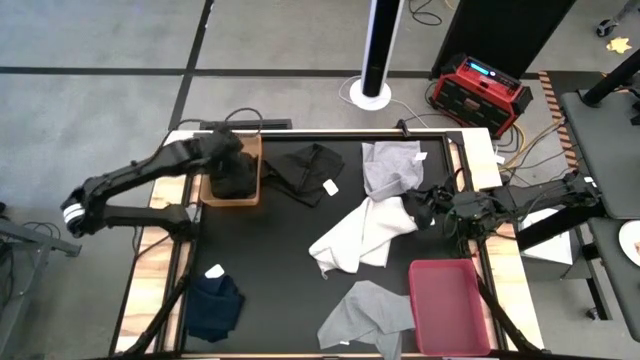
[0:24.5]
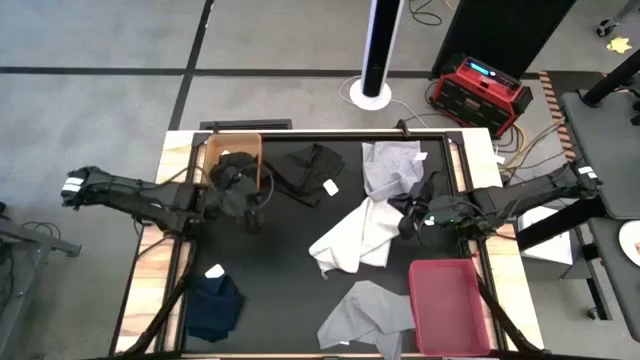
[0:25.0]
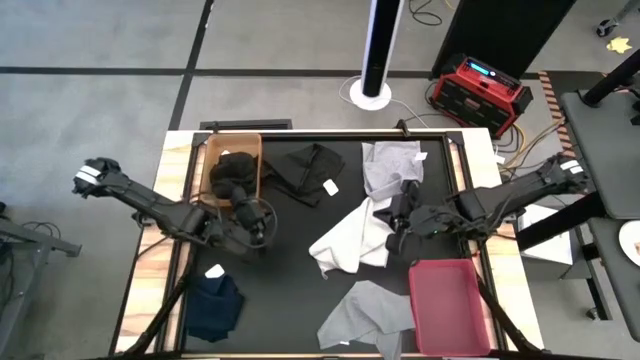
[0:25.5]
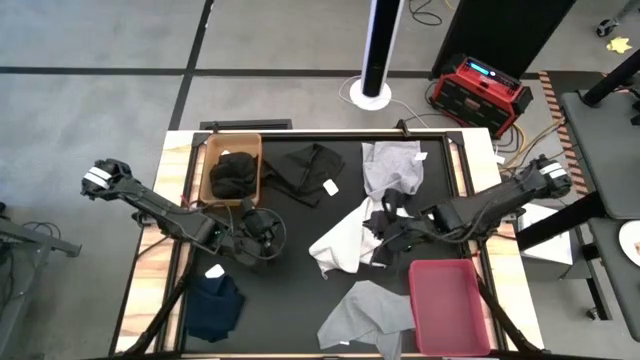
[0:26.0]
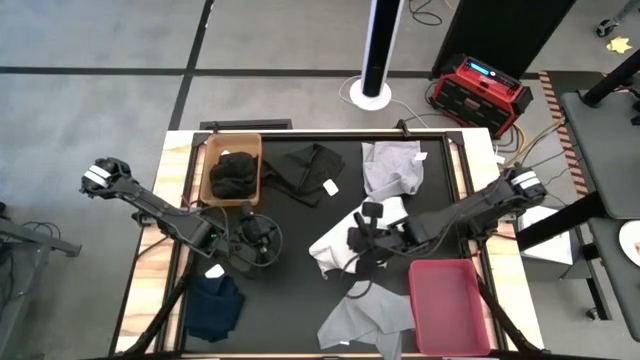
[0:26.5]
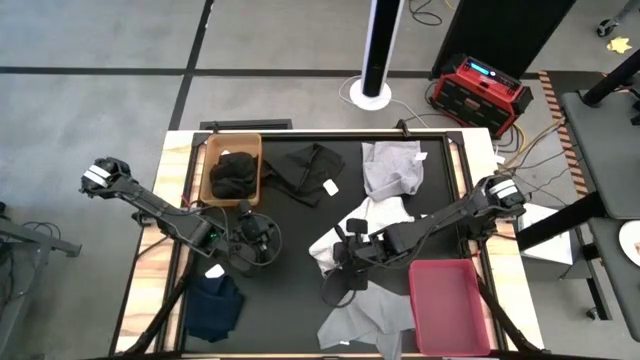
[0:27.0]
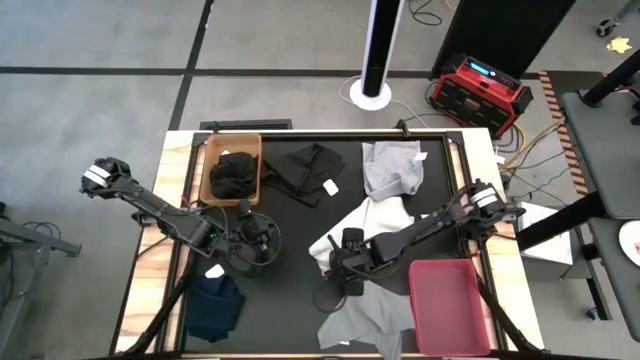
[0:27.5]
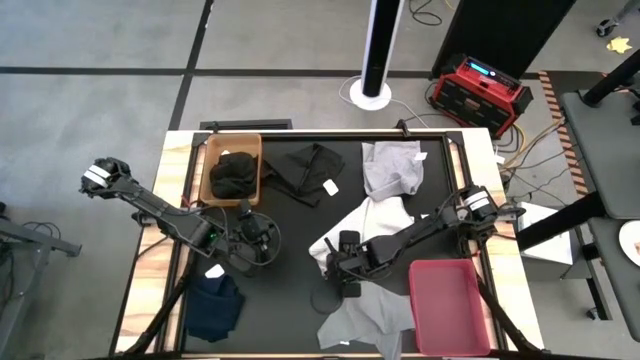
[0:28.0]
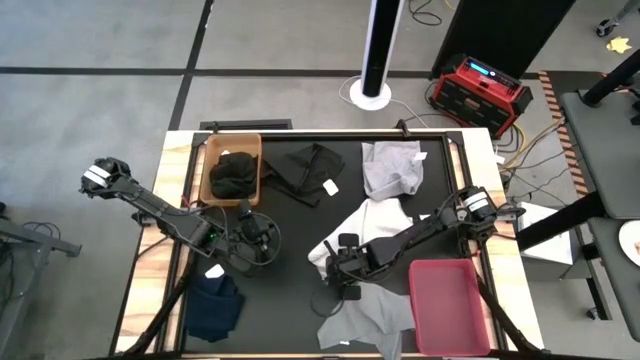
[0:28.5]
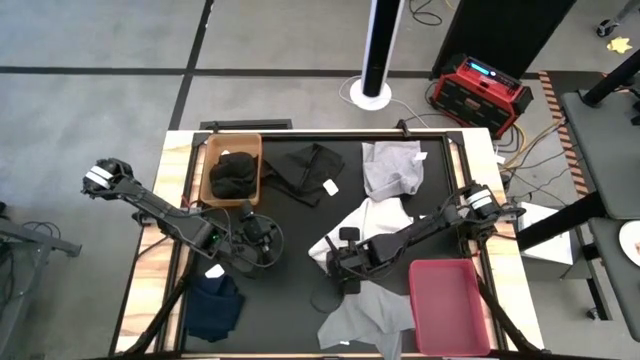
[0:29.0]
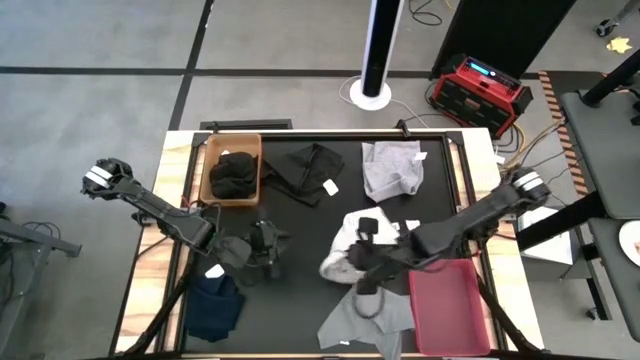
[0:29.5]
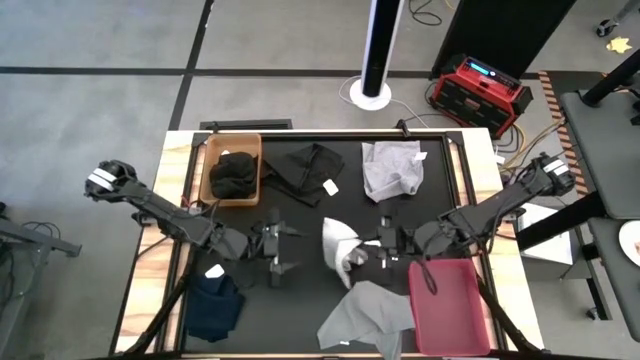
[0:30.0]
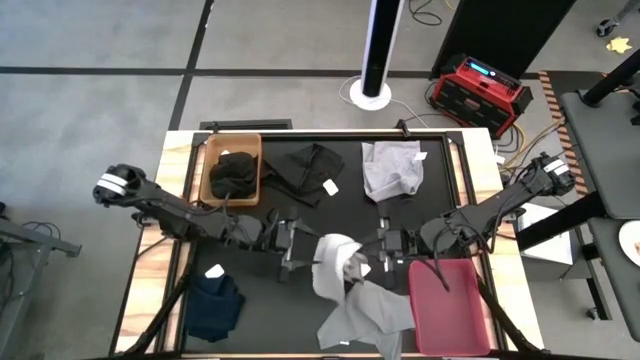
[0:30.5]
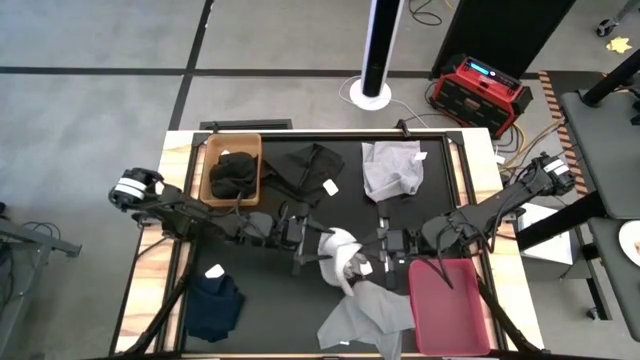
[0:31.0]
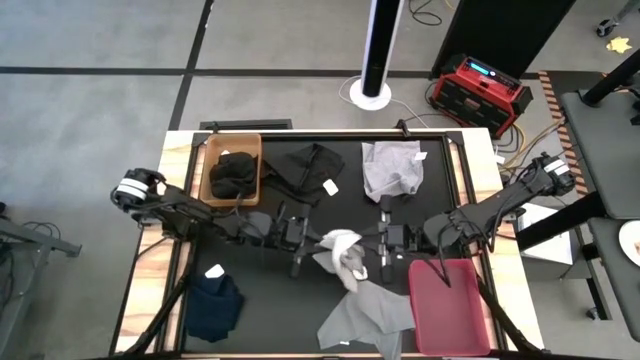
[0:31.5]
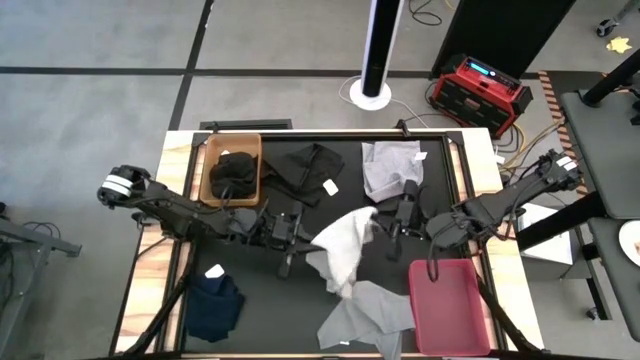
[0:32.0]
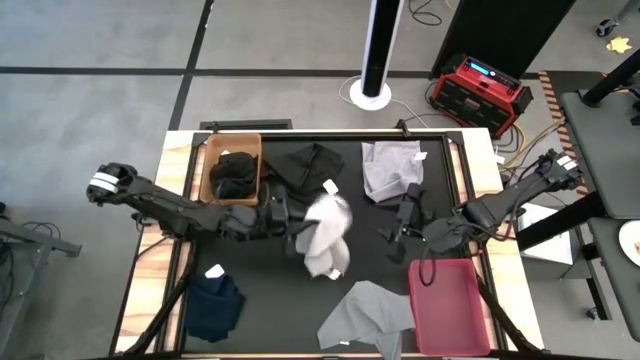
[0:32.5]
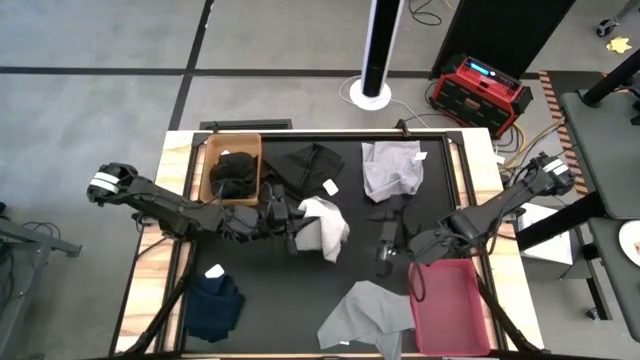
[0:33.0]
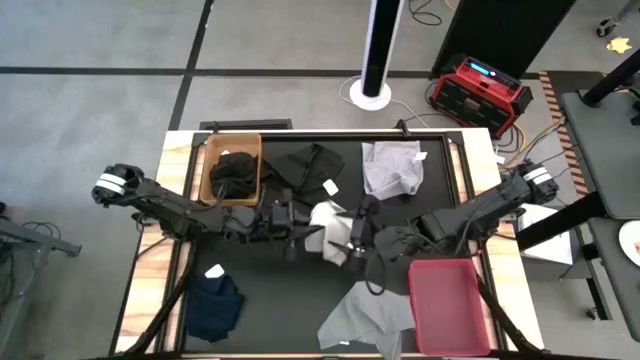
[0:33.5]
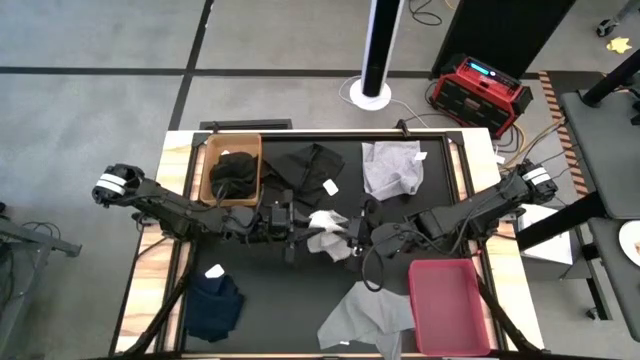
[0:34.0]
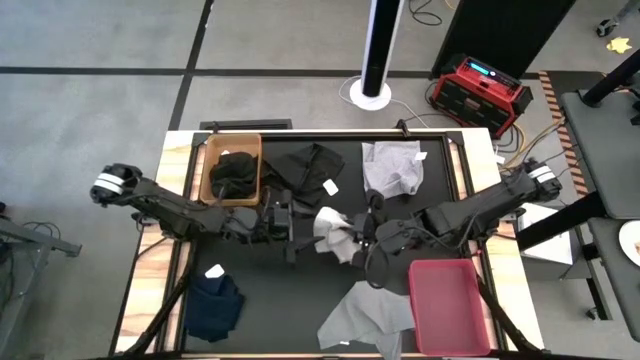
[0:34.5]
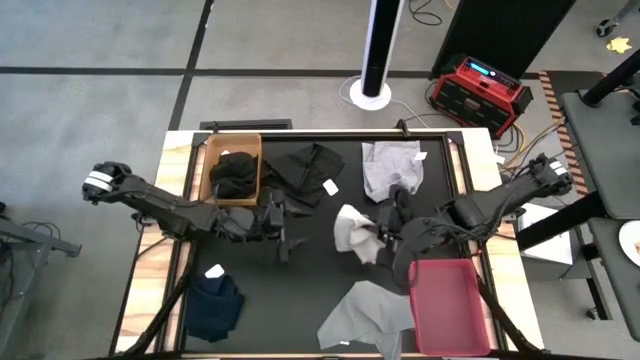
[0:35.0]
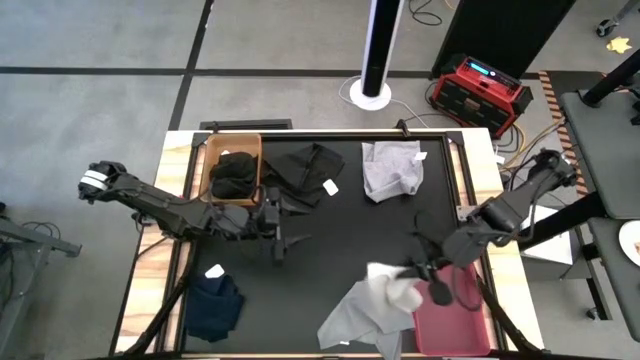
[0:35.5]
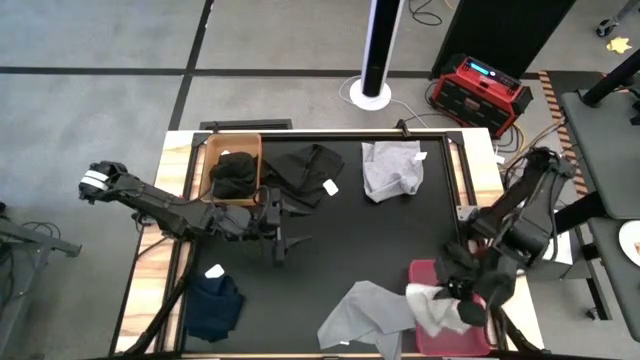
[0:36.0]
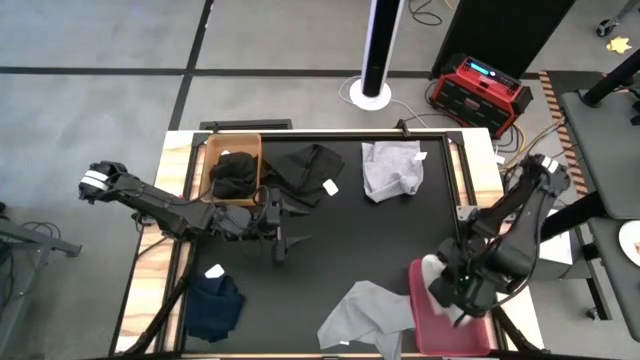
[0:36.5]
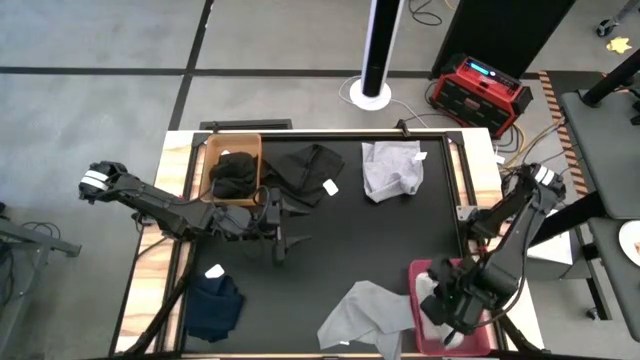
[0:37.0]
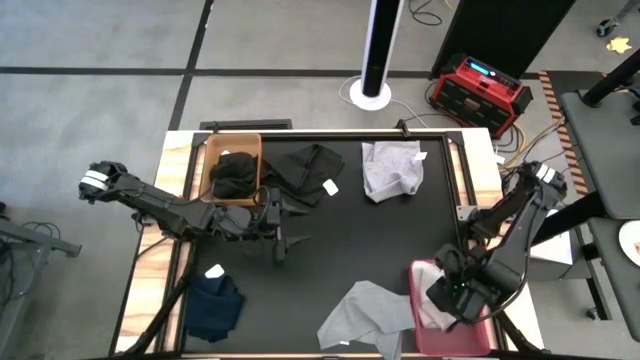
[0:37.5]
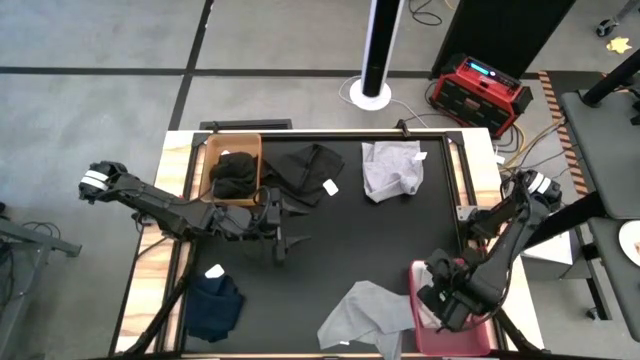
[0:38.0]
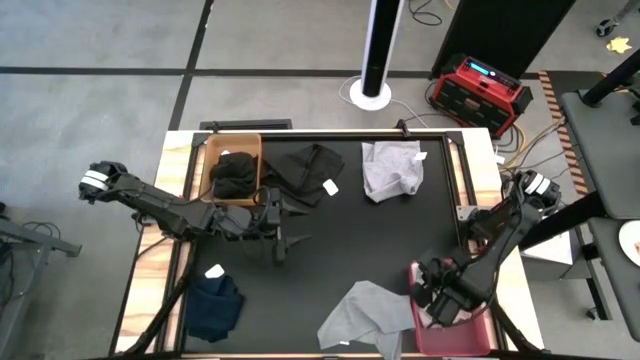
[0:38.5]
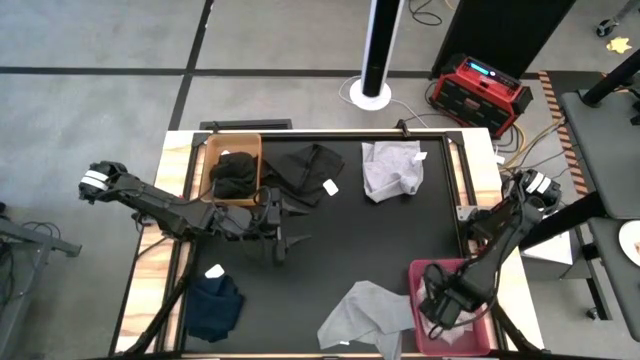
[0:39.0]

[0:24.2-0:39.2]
Task: Sort towels by color in basket
Put the white towel into the pink bin

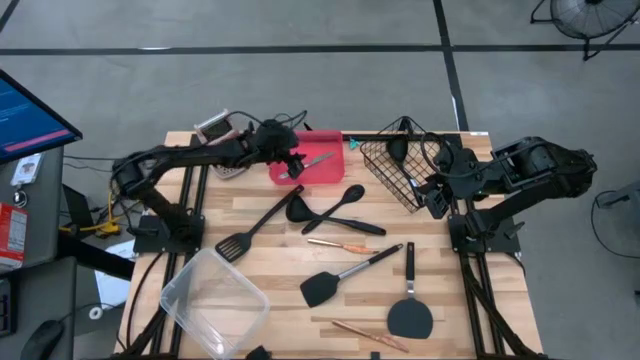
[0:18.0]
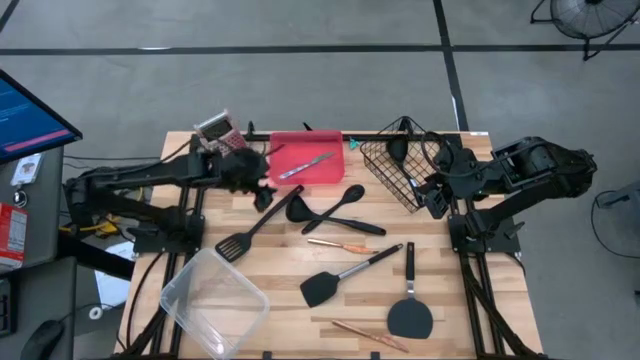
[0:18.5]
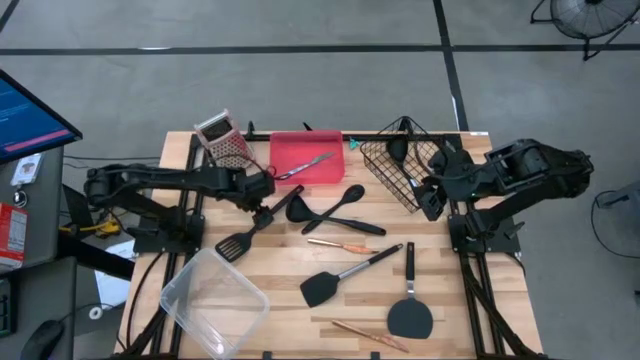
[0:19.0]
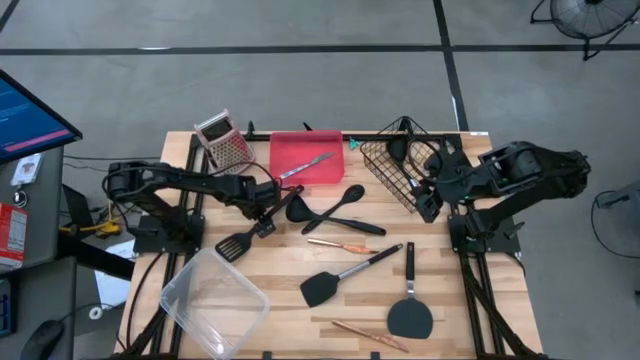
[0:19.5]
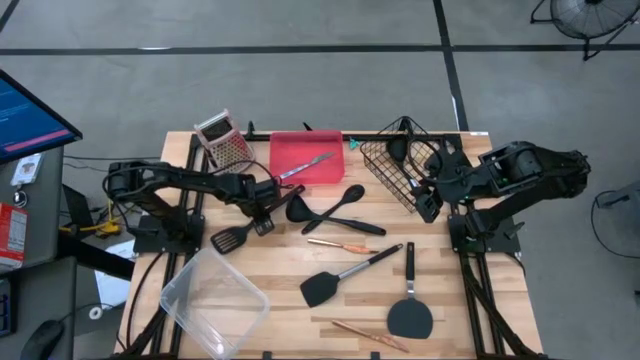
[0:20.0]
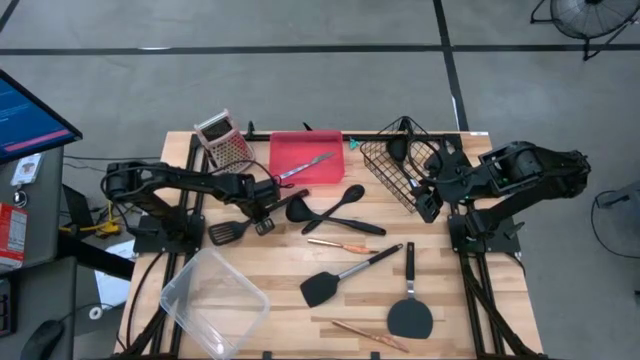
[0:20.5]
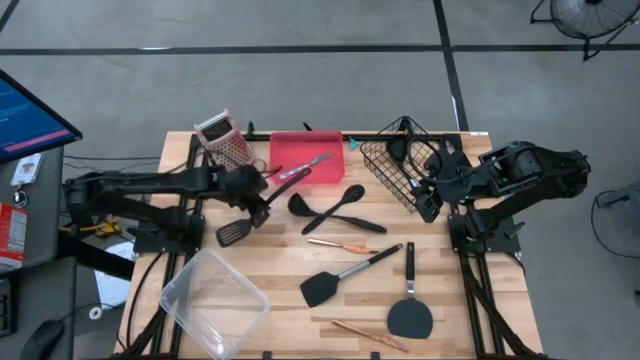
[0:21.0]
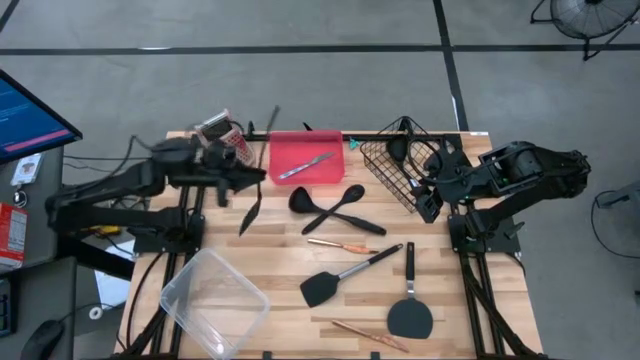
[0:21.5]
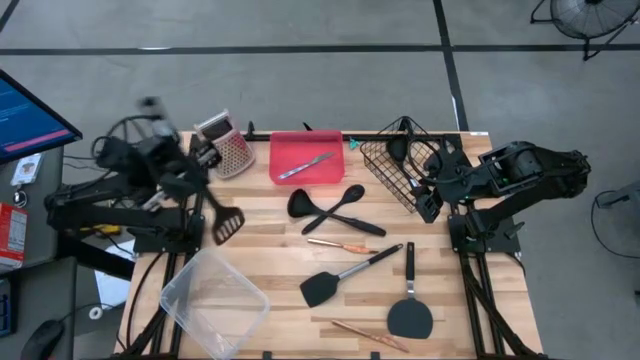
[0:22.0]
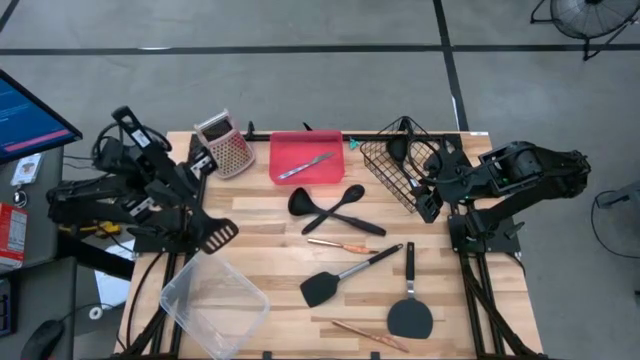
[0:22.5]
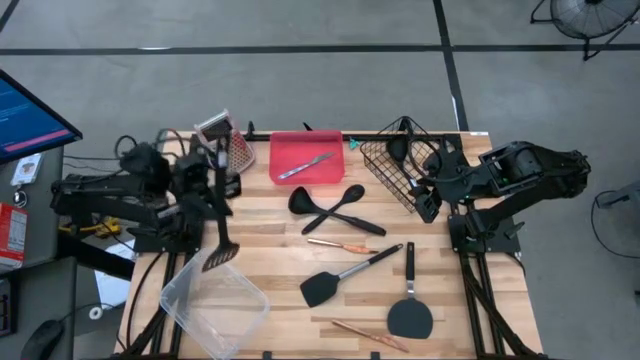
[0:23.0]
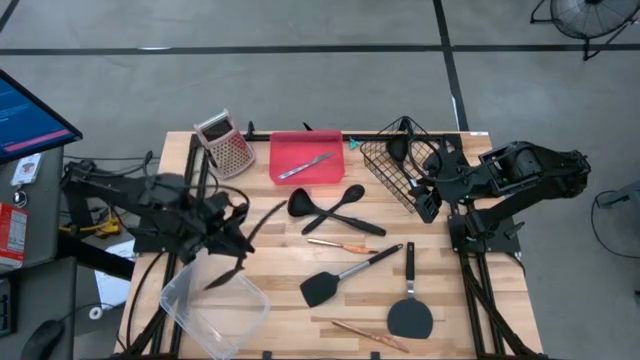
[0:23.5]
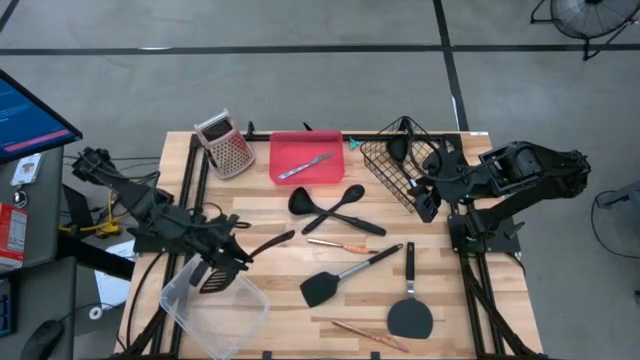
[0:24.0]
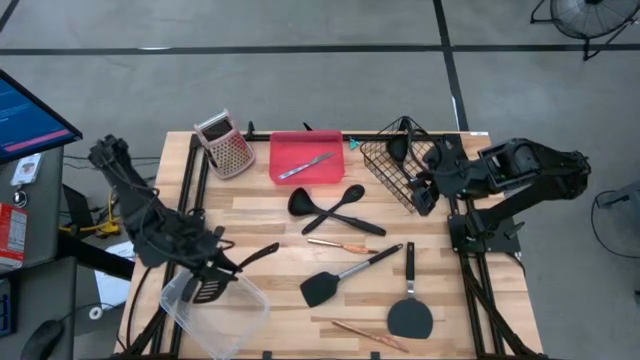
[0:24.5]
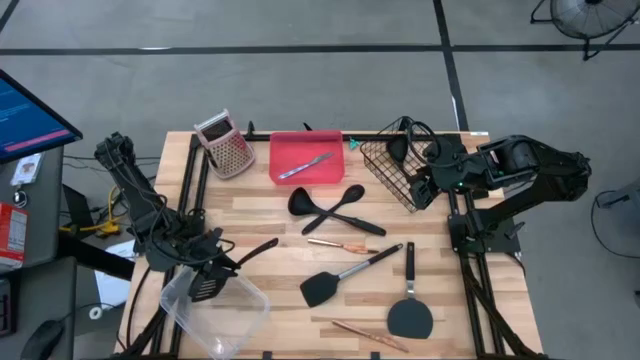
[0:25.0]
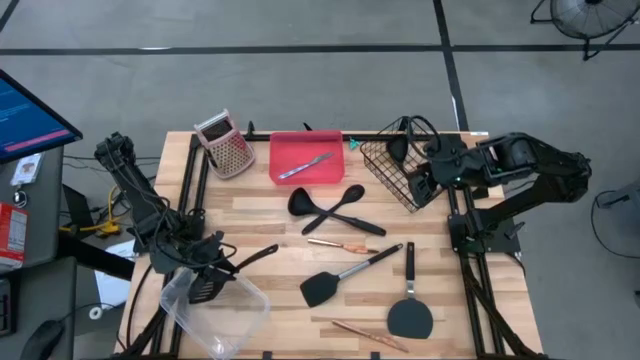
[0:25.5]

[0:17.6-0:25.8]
Task: Pick & Place Kitchen Items
Put the black spatula into the transparent bin
